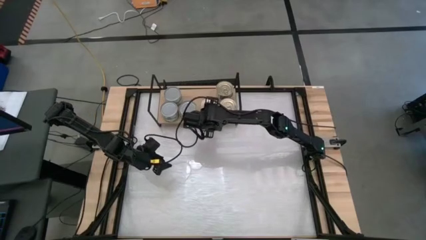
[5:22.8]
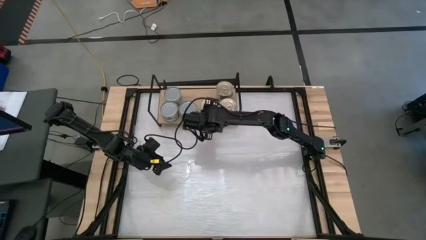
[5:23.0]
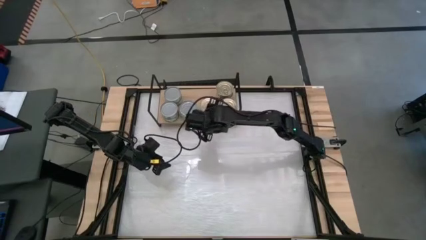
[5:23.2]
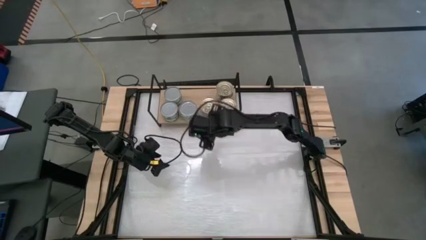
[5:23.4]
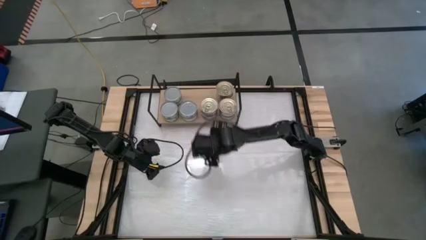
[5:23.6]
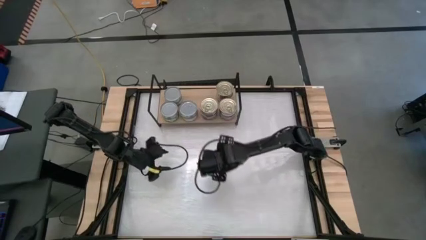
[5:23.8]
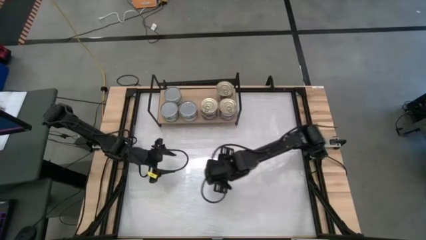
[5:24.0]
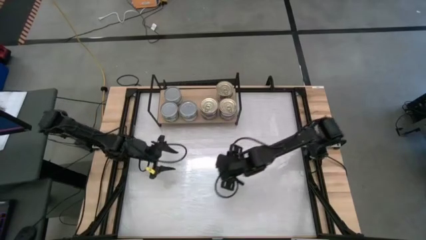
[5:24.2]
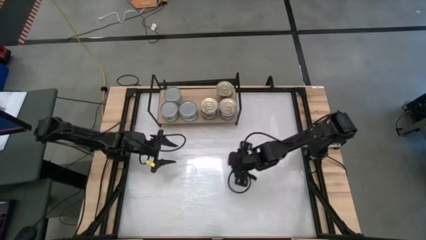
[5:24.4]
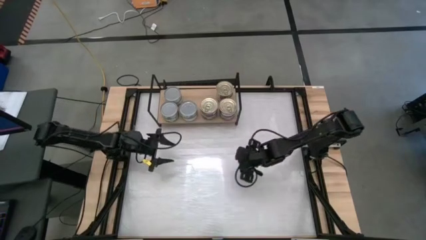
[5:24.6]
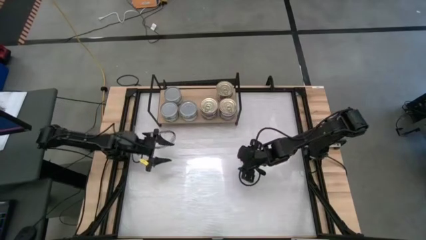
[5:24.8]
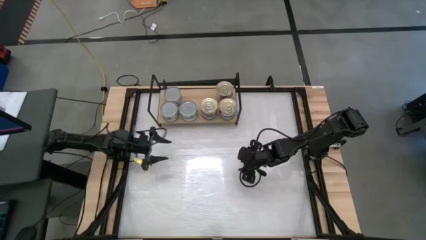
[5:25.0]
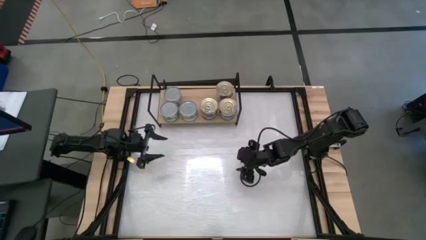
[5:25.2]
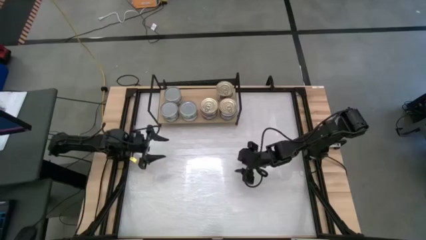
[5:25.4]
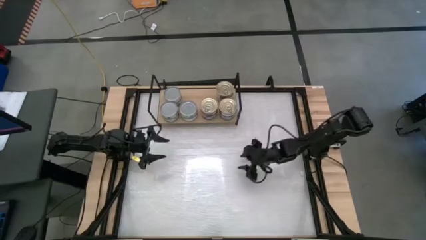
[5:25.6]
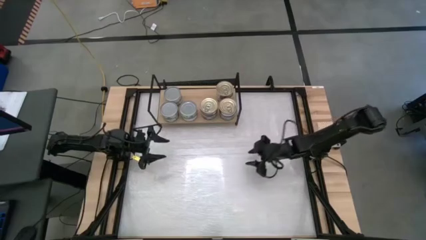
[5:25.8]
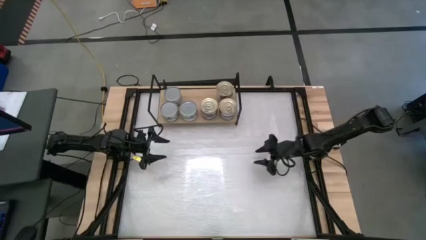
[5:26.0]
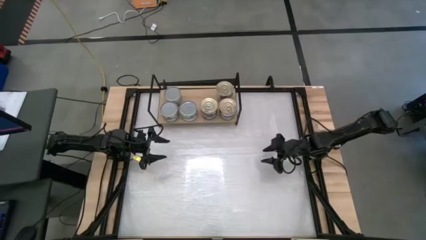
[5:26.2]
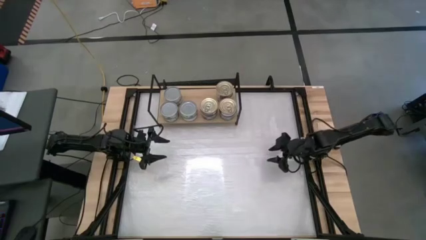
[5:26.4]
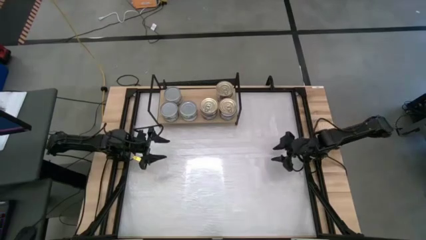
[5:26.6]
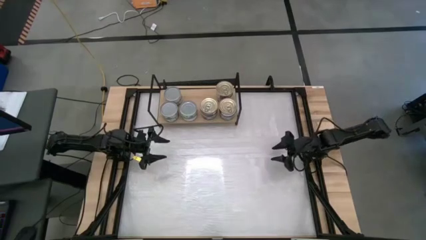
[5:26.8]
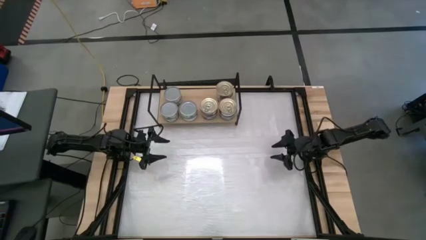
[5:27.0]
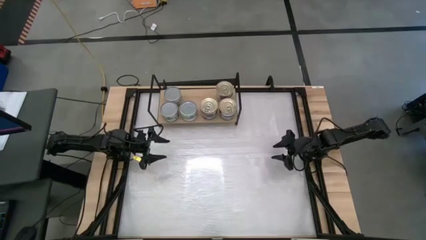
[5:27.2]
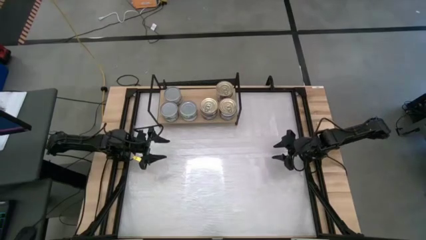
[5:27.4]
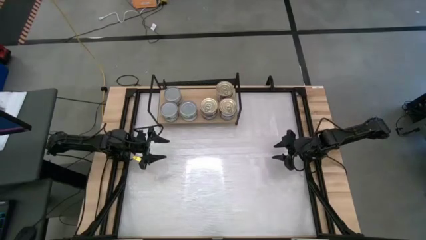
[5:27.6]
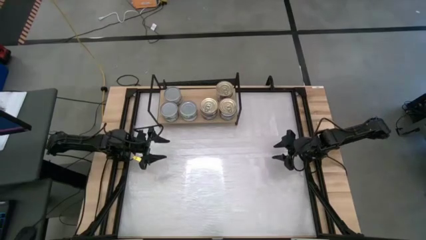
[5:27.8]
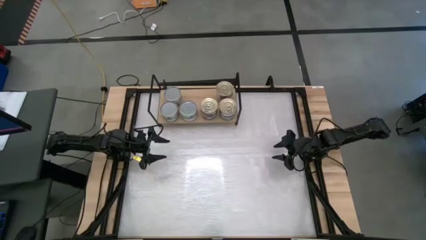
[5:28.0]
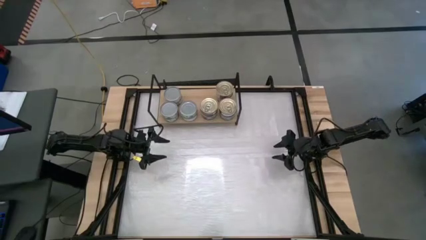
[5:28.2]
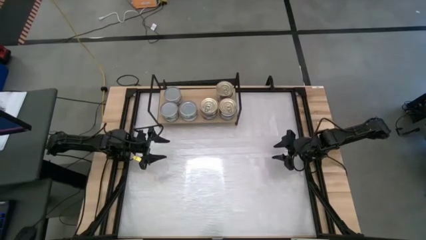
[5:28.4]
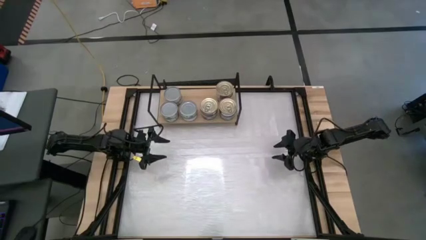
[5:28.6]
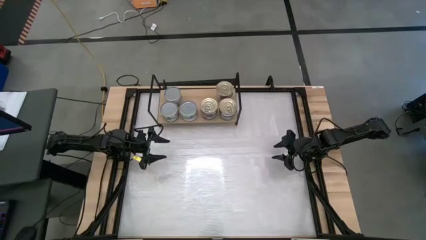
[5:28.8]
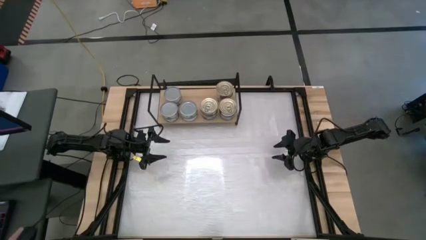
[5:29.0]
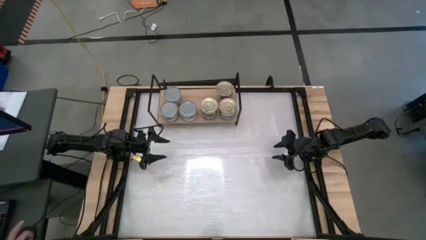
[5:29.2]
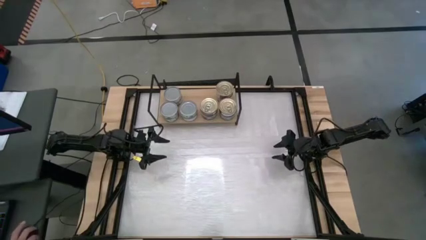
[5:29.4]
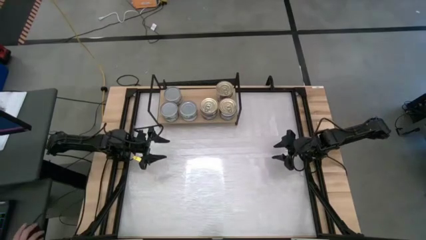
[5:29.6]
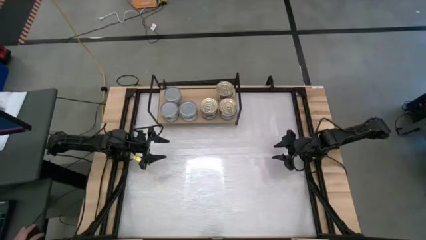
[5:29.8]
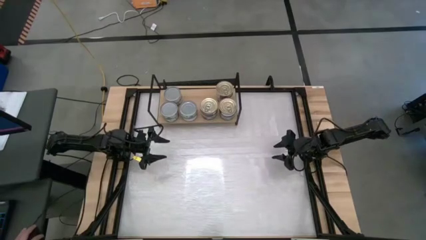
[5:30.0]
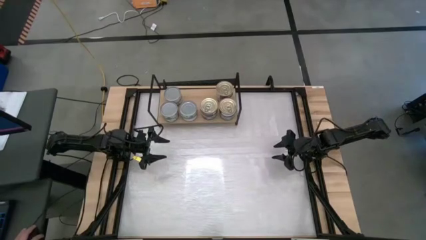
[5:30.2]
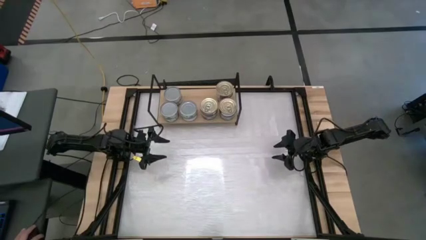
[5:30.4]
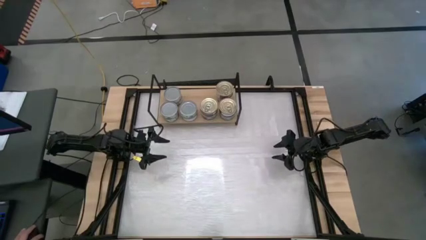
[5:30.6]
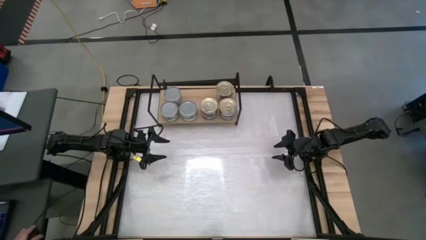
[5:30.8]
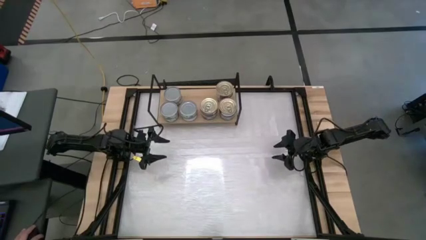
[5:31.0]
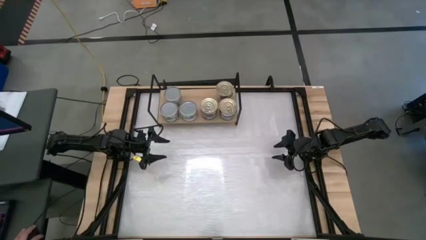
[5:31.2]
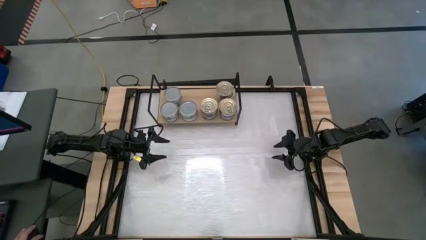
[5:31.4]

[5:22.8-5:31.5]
Task: Stack canned seafood by type on shelf
Return to Home Position

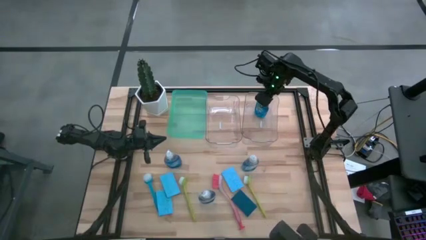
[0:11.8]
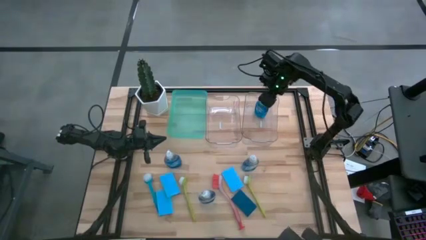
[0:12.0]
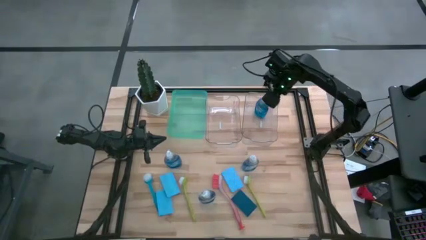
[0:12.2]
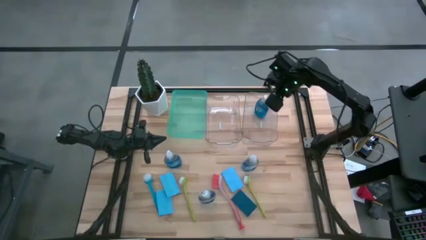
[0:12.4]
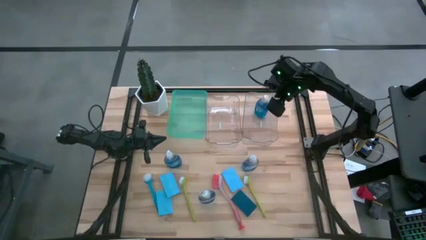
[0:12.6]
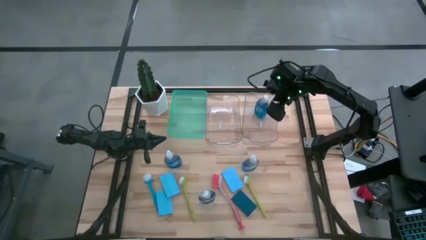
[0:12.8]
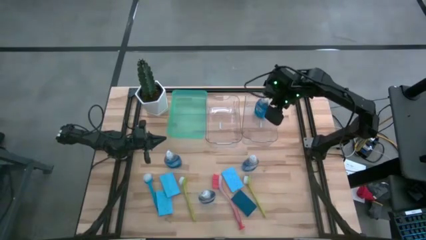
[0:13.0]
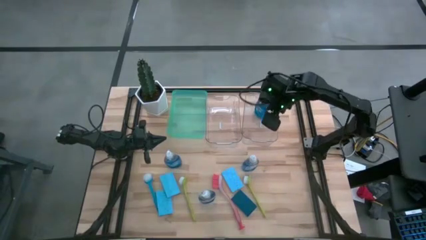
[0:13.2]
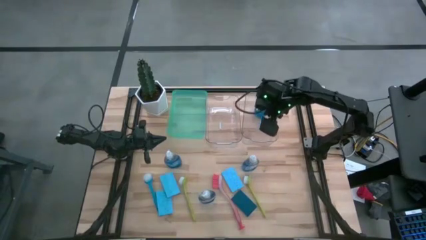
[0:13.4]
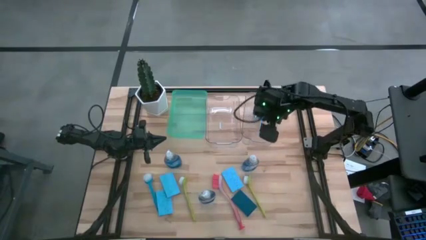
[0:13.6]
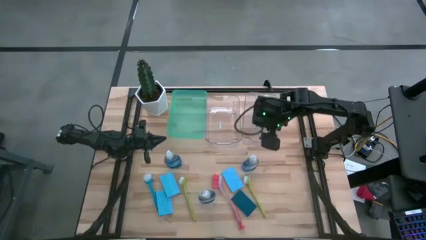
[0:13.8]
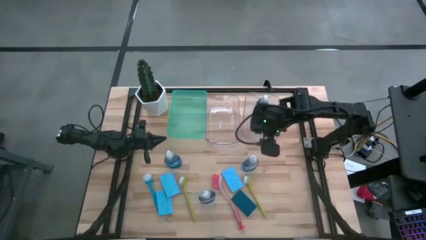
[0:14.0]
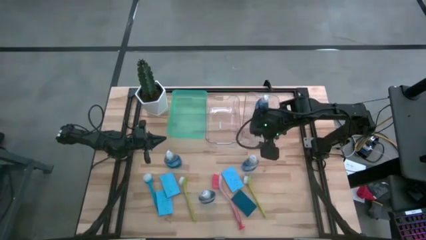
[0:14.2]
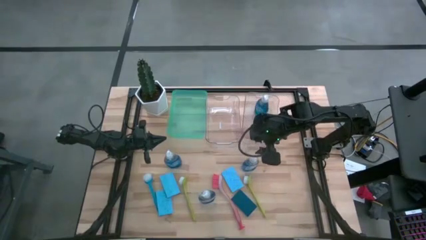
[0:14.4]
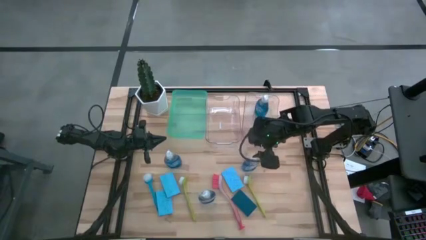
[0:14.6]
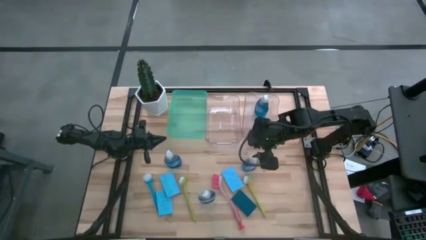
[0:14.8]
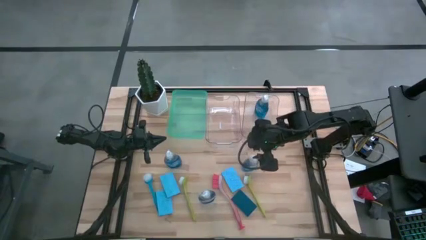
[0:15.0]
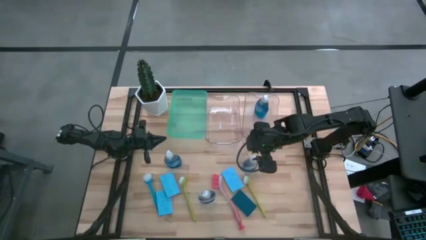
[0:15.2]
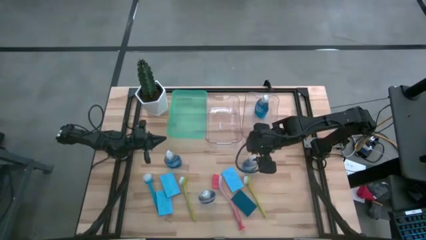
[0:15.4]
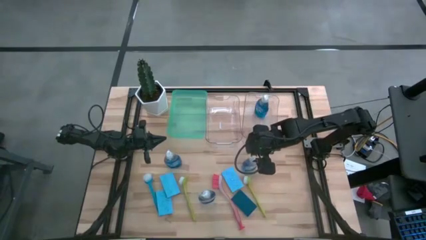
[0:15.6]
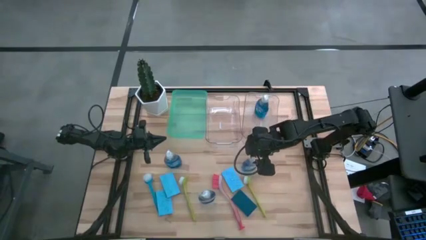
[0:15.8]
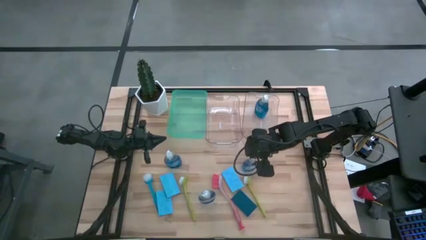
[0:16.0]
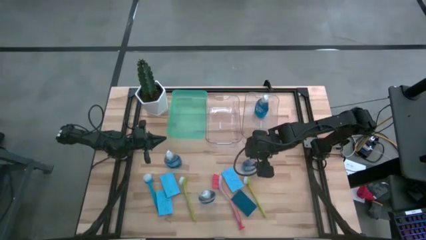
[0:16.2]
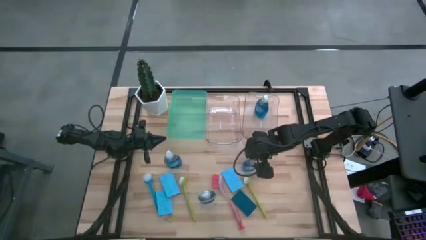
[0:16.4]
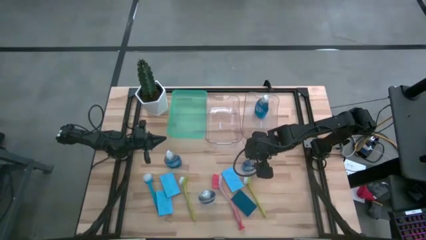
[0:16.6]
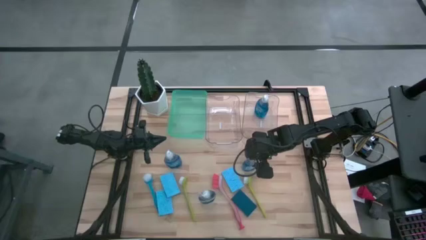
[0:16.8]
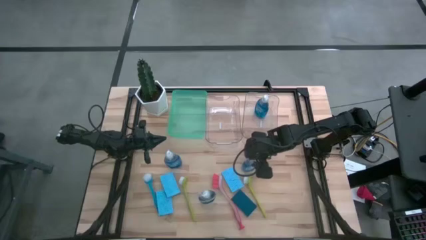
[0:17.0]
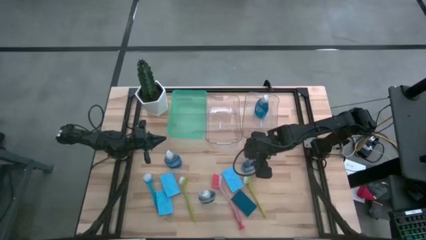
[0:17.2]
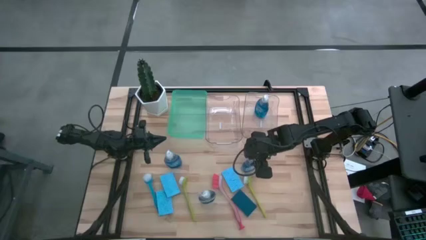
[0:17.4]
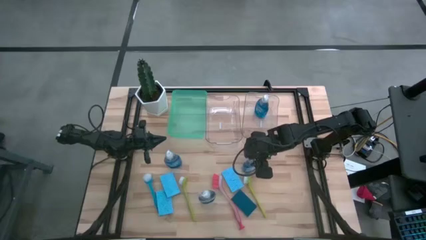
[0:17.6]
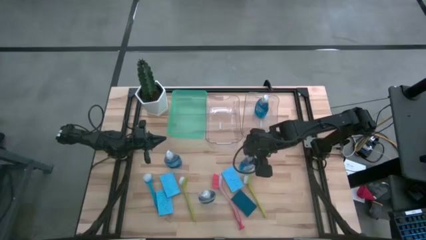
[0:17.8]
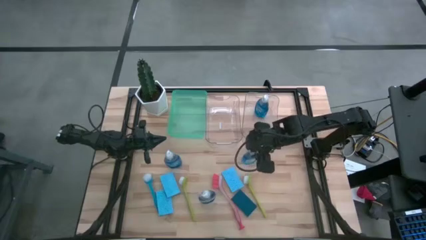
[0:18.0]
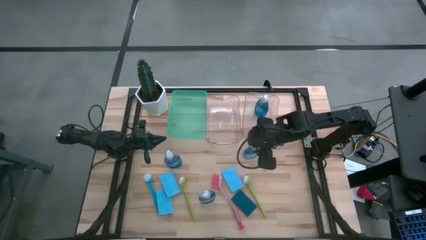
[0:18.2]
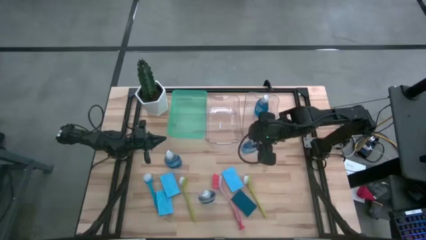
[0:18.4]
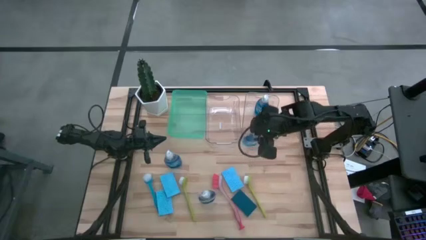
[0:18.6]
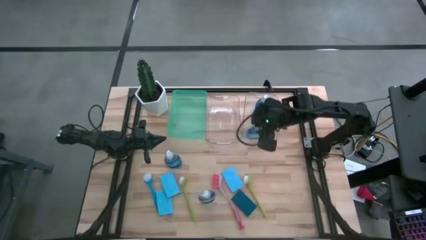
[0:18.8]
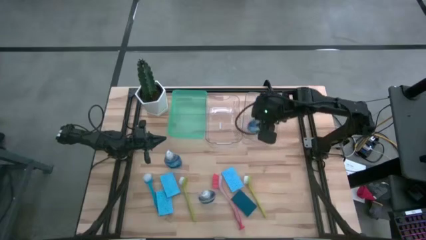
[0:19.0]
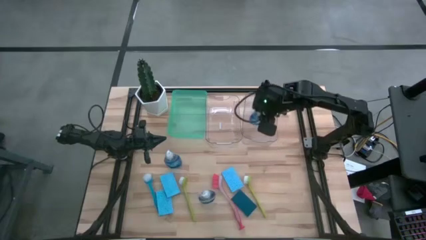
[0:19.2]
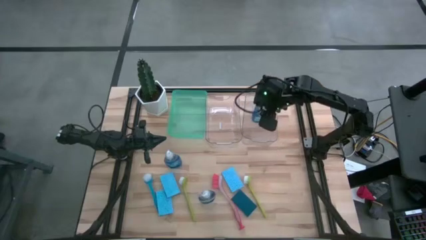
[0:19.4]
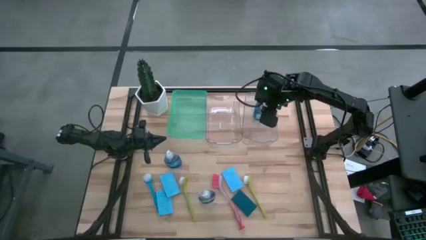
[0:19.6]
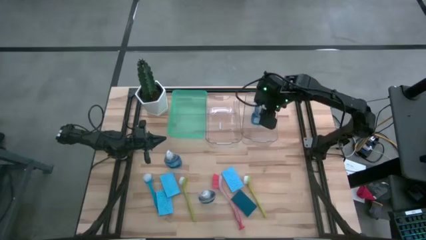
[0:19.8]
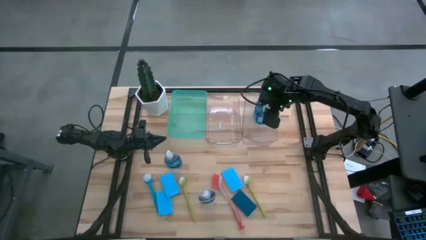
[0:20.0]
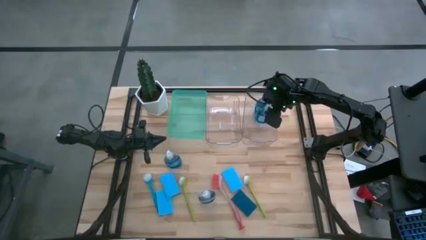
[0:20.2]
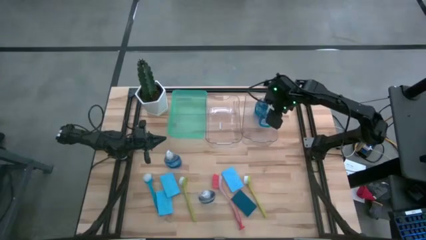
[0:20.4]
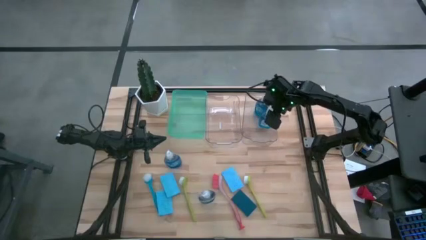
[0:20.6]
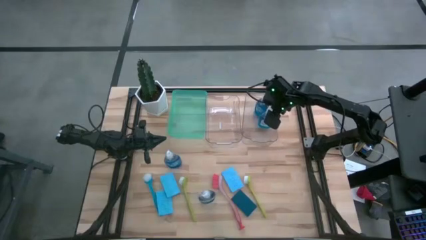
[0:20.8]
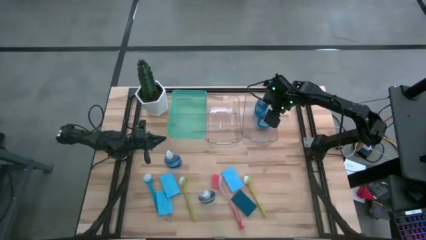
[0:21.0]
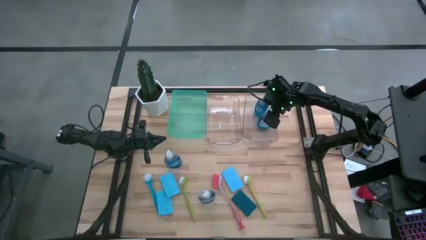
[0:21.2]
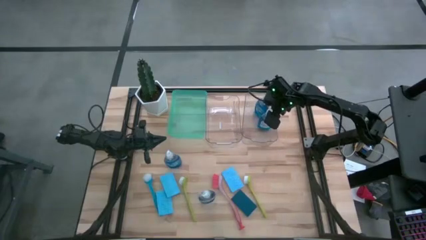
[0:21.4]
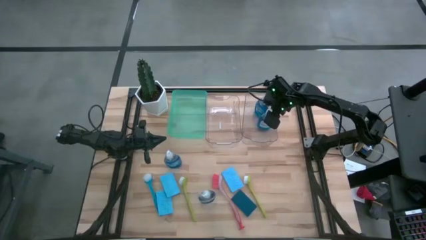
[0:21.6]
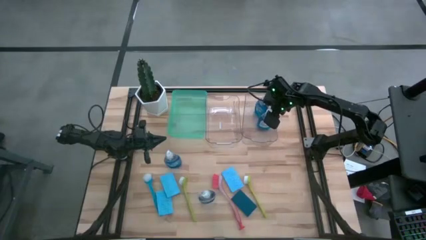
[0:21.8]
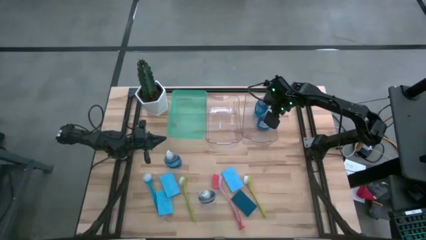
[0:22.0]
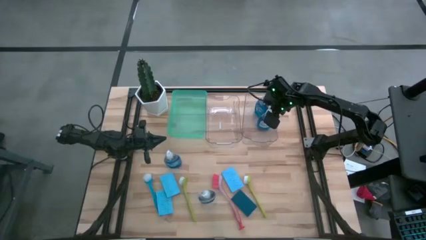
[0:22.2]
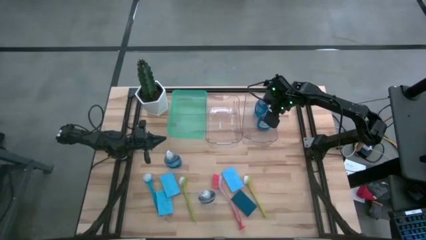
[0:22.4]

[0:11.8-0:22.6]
Task: Pick & Place Kitchen Sink Supplies
Put the blue dishwashing liquid bottle into the right transparent bin
